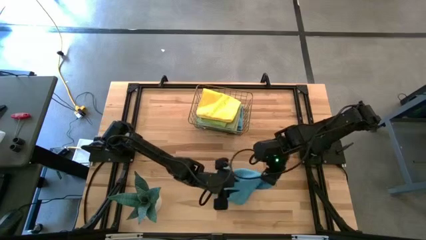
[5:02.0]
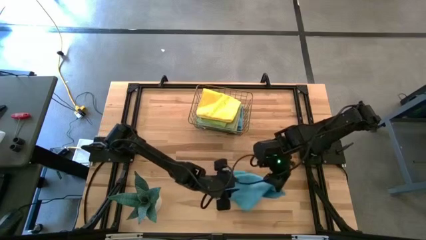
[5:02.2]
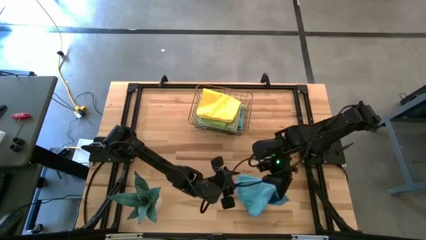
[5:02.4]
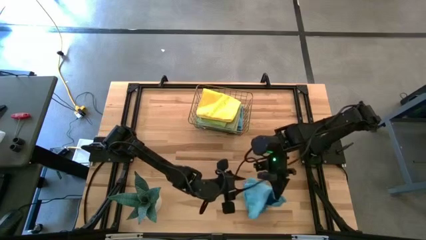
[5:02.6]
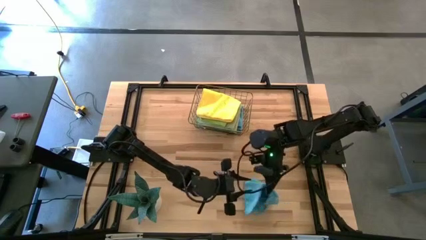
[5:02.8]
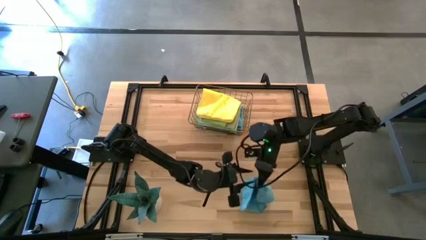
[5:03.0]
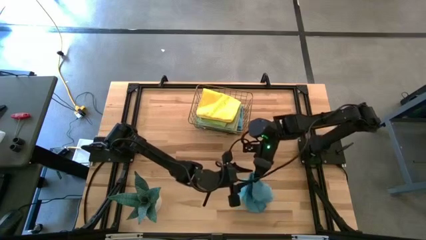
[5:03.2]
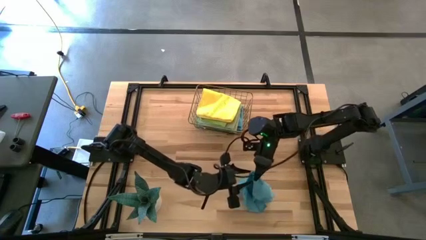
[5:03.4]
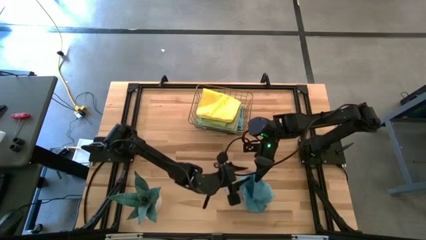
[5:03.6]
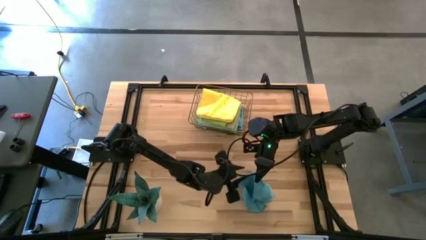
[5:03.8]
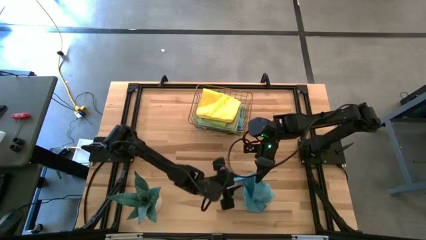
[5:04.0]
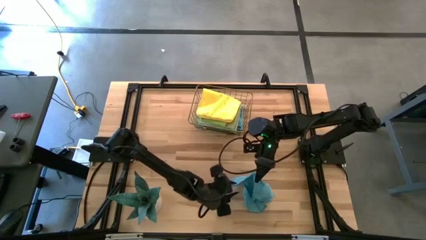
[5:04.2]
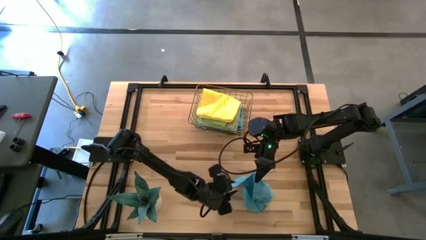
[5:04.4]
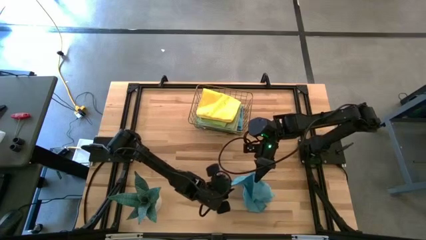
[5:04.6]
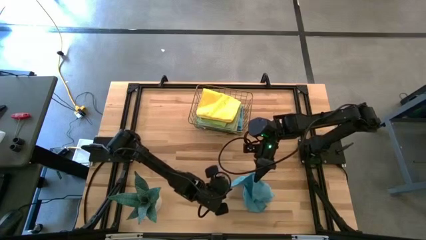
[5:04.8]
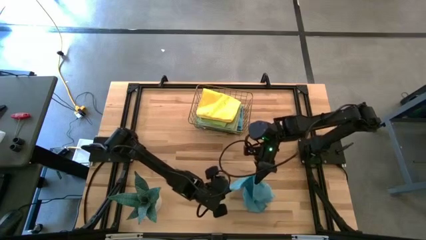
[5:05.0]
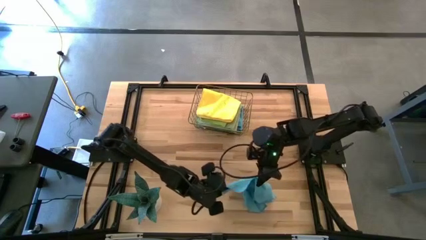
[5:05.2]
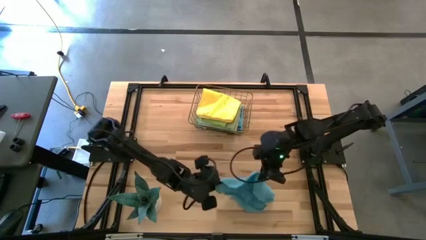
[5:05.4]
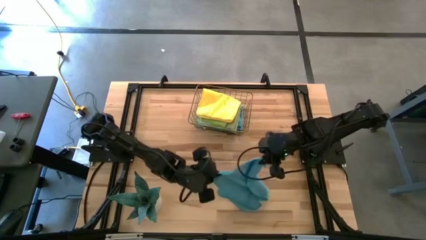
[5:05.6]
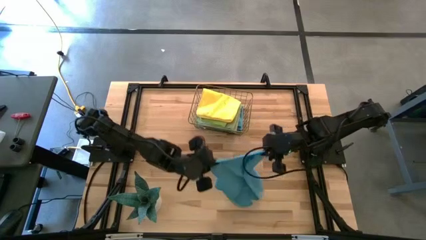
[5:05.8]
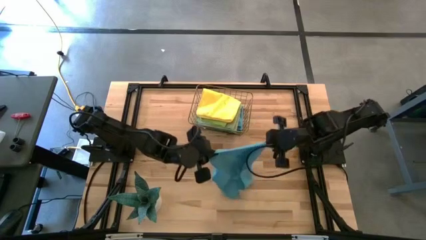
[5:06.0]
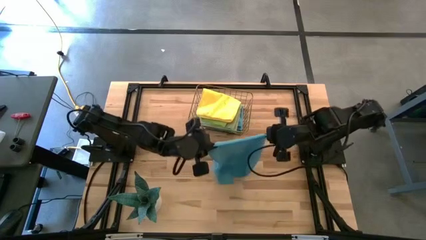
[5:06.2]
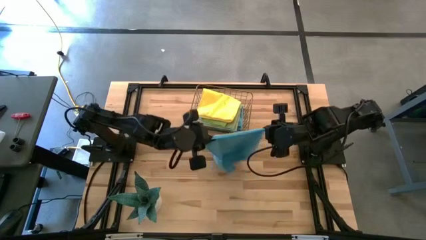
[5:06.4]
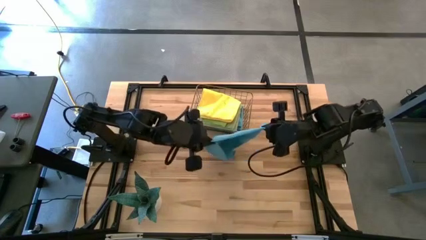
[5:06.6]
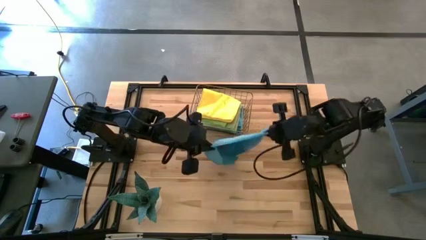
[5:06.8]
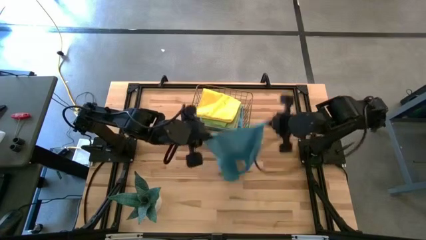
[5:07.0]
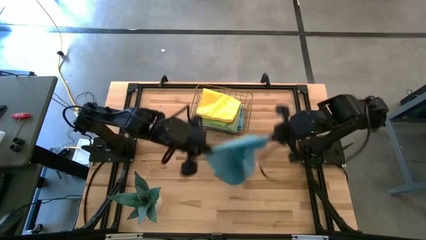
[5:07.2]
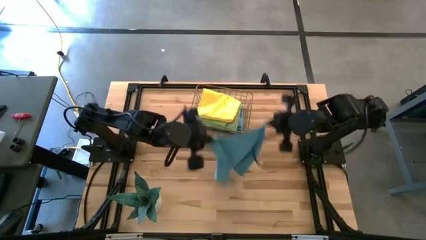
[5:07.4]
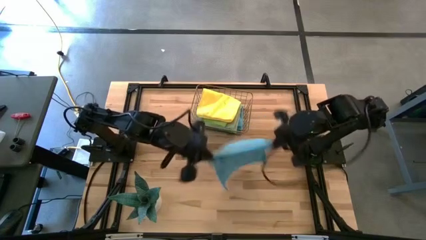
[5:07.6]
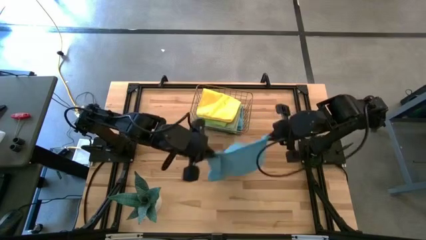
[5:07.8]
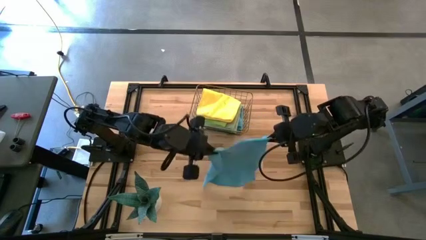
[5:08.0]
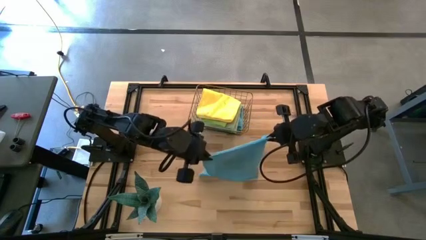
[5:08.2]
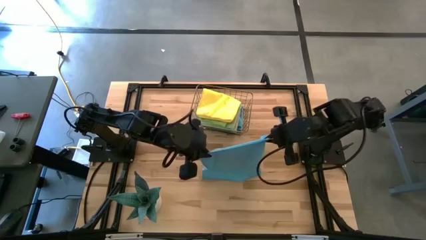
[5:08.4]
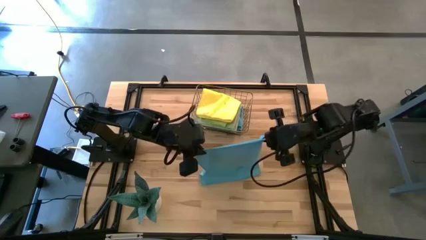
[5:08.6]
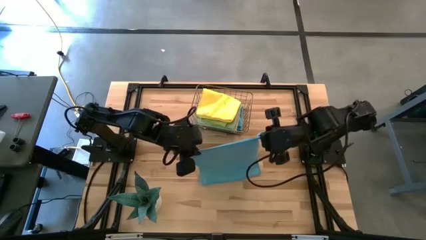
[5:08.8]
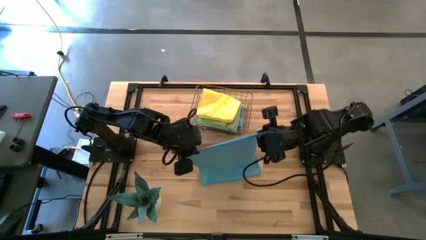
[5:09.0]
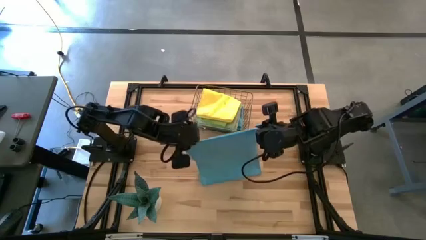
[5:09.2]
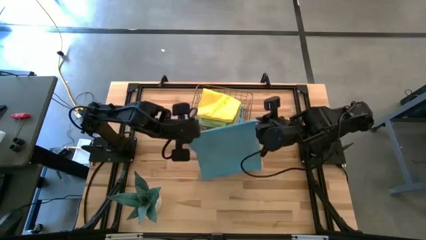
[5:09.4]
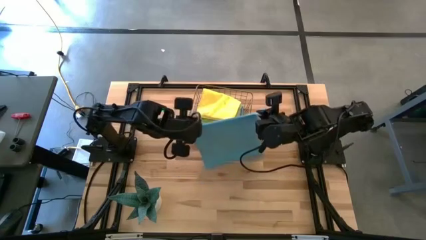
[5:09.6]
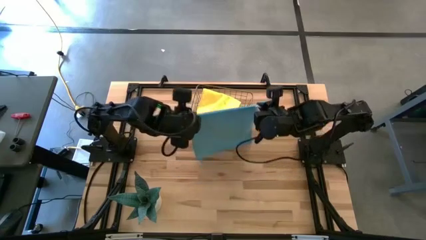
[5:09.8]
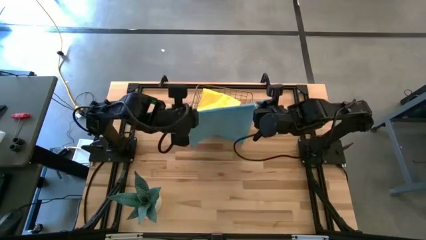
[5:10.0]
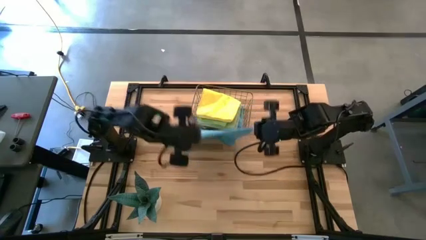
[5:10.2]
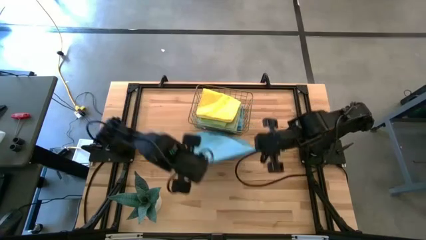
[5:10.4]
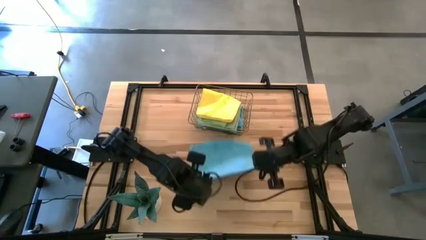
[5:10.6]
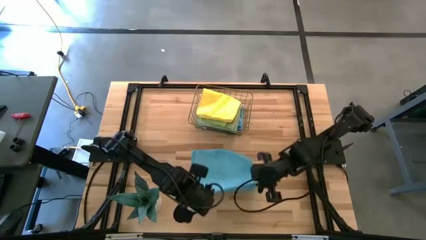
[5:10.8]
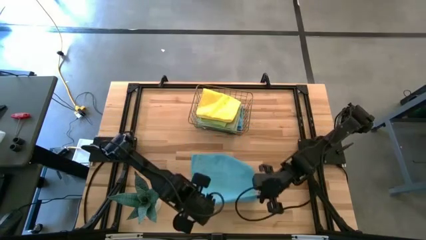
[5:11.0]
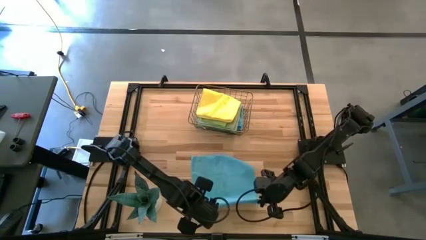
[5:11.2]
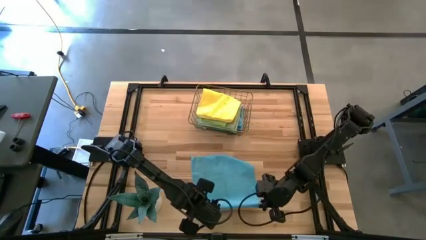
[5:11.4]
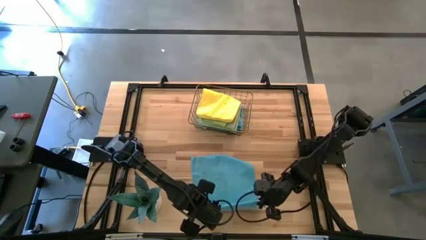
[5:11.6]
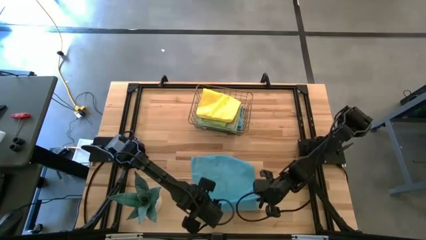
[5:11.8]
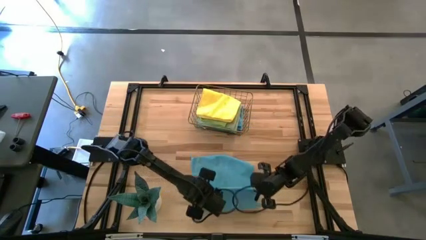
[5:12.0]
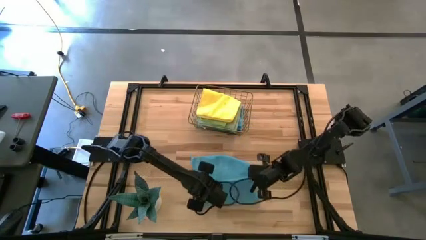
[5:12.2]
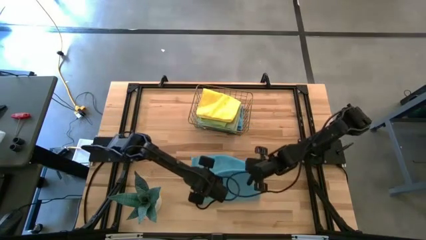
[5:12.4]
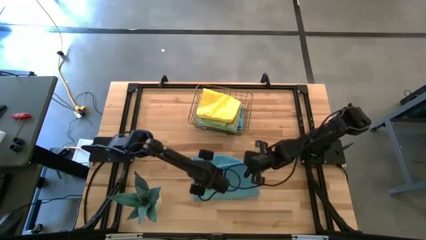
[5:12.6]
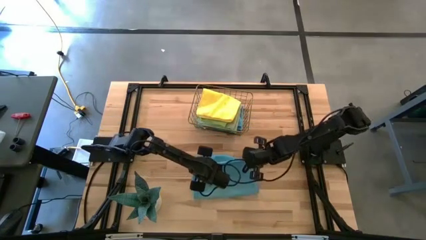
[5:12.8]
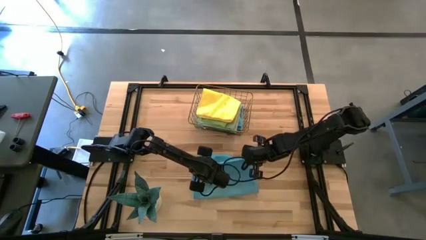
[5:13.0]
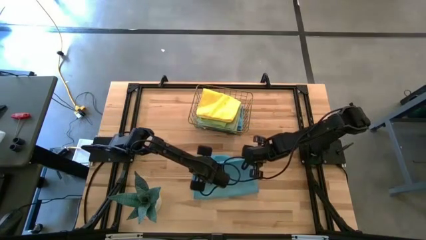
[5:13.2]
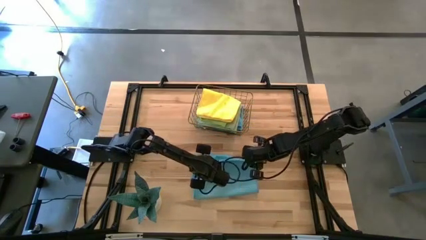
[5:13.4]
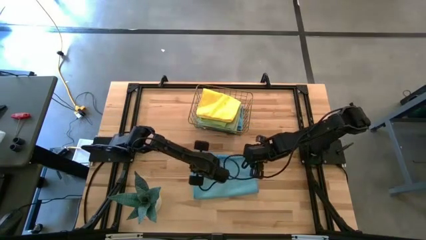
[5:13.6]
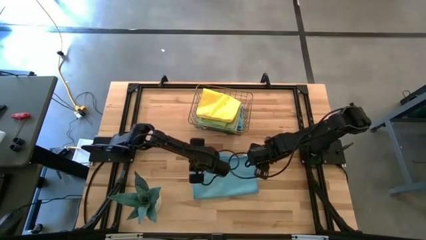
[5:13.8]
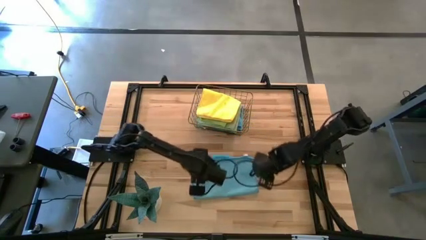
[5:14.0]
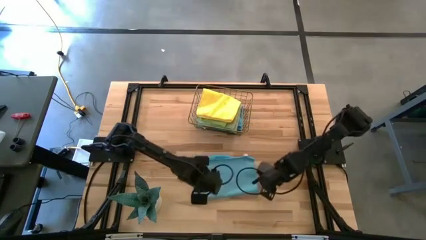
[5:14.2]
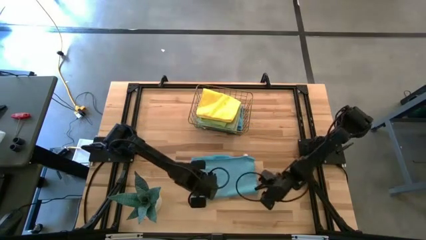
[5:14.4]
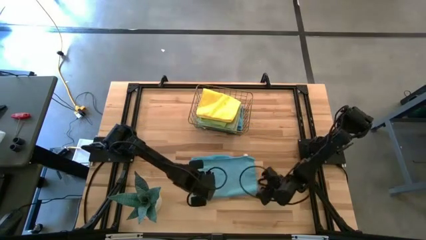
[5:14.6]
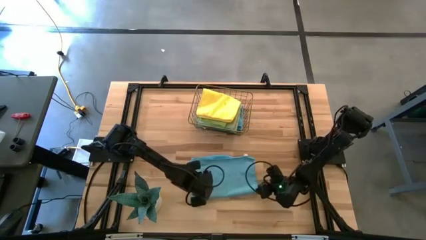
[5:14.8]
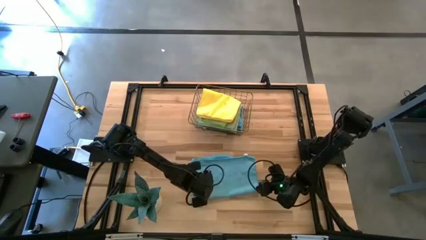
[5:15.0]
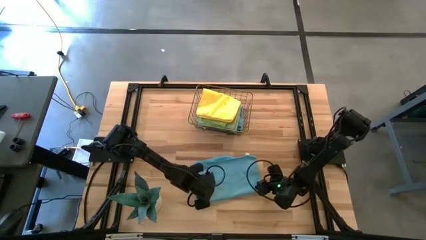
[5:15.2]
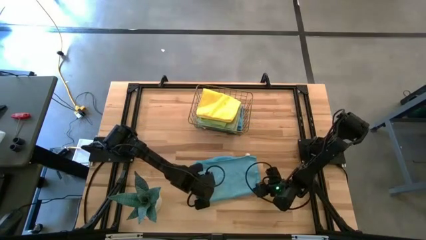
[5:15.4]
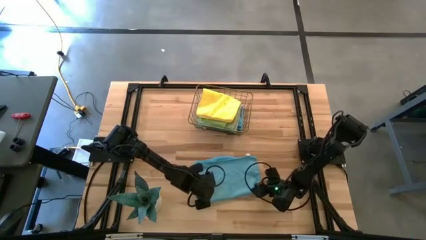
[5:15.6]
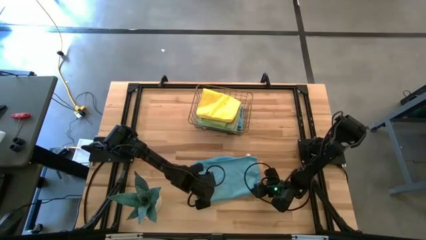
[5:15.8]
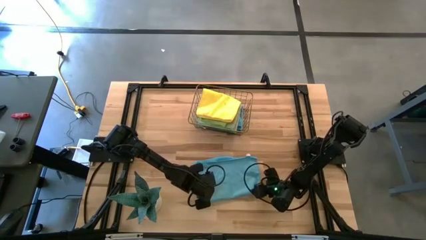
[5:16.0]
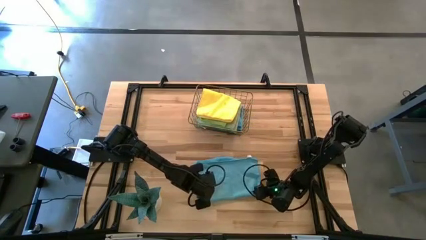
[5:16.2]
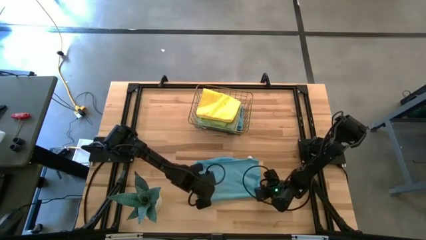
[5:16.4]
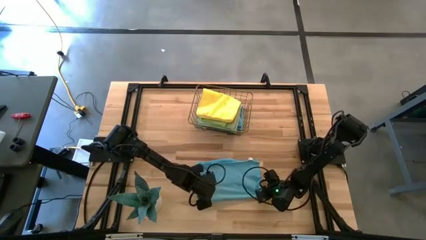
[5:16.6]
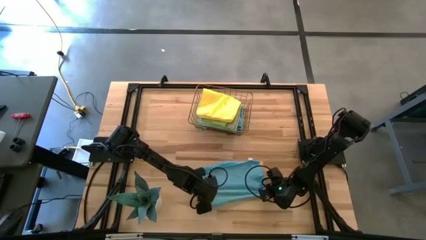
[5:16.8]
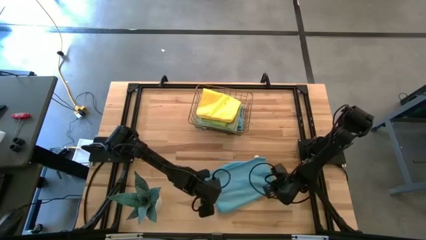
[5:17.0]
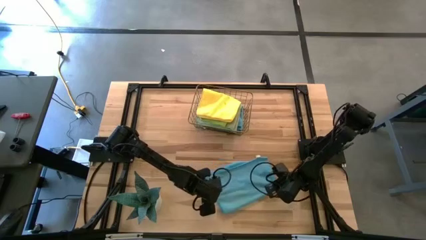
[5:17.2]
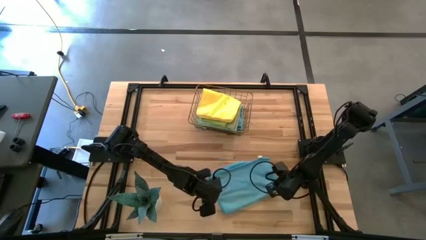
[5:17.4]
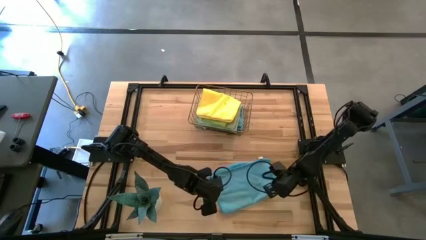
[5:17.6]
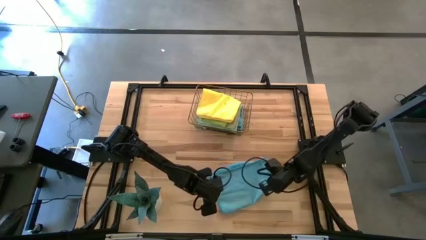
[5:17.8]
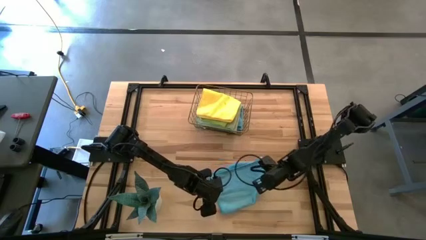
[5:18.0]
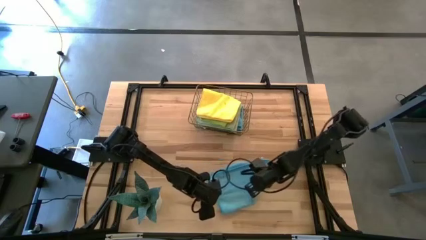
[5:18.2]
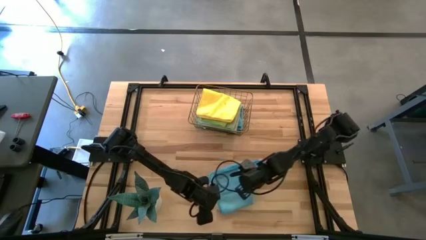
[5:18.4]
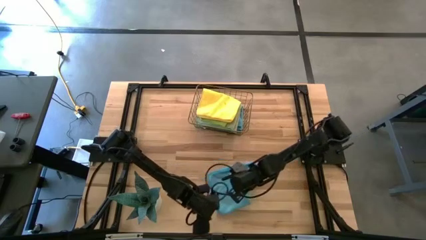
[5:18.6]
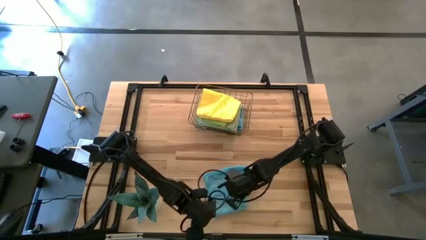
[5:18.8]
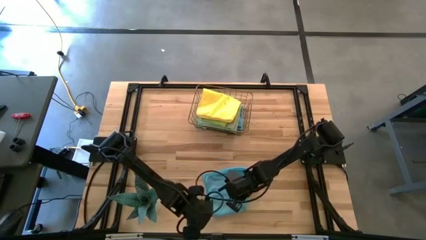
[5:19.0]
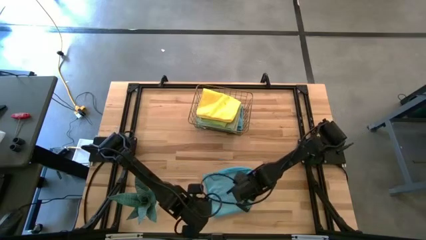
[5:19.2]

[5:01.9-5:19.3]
Task: Fold microfiber towels
Fold the blue towel
